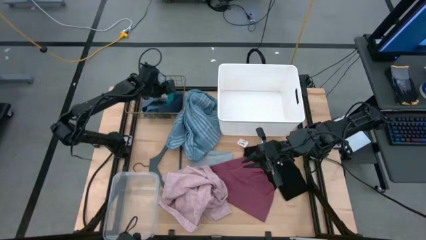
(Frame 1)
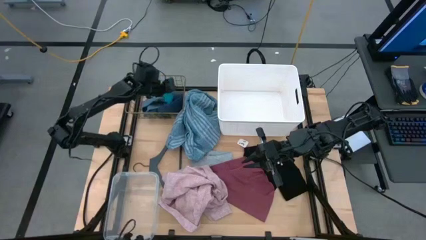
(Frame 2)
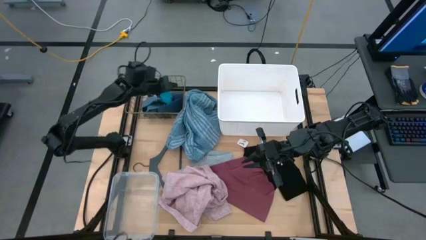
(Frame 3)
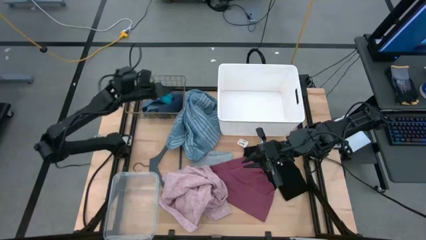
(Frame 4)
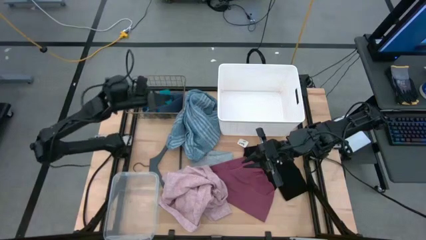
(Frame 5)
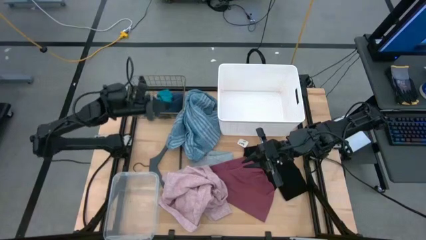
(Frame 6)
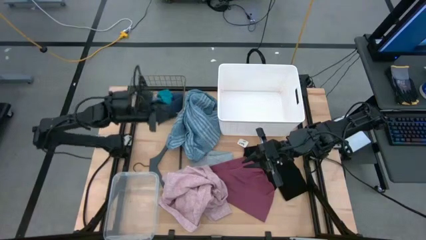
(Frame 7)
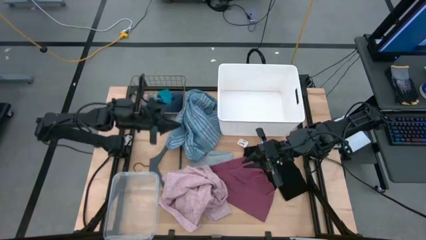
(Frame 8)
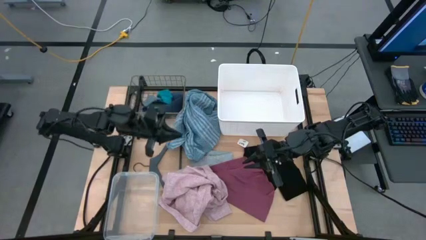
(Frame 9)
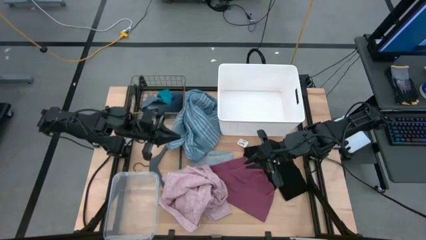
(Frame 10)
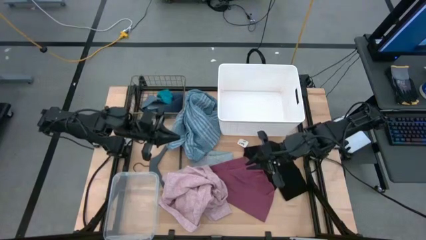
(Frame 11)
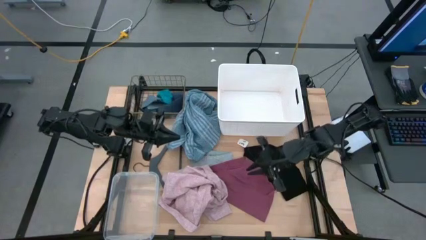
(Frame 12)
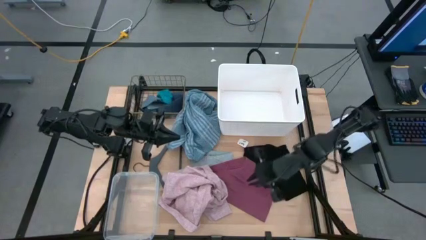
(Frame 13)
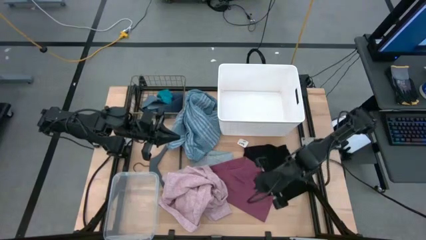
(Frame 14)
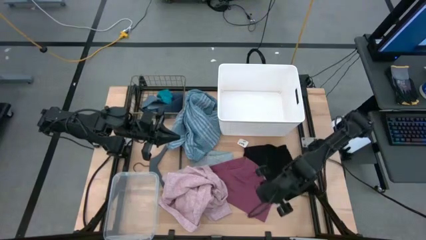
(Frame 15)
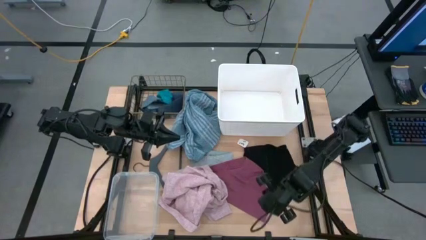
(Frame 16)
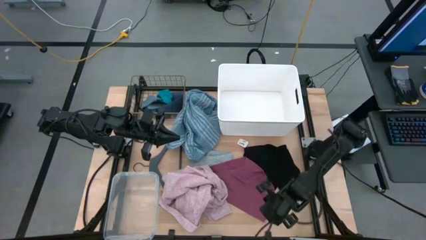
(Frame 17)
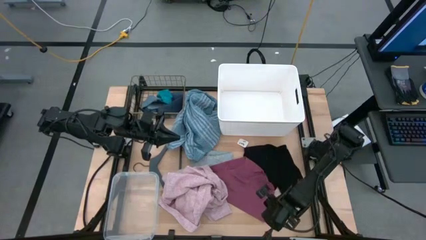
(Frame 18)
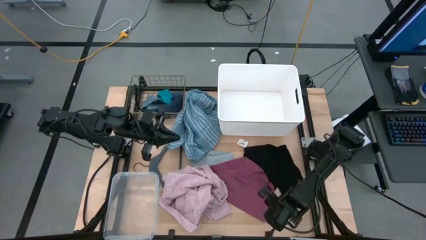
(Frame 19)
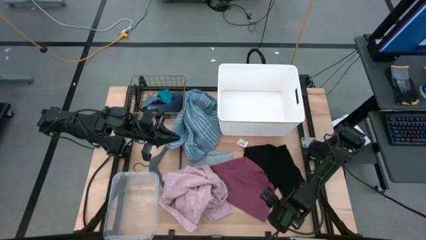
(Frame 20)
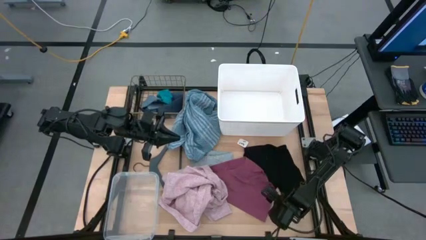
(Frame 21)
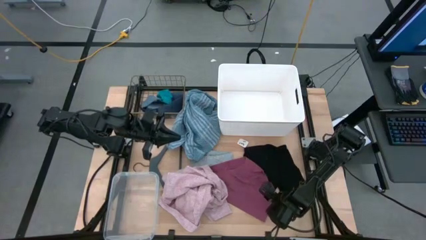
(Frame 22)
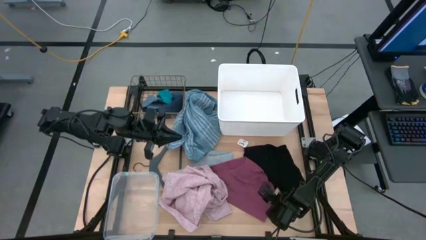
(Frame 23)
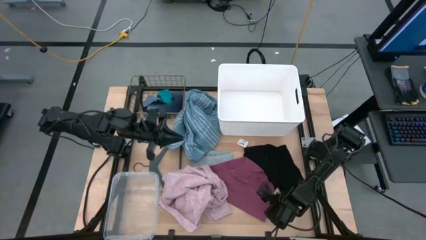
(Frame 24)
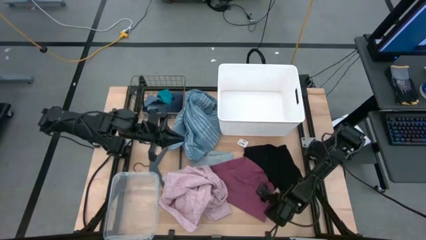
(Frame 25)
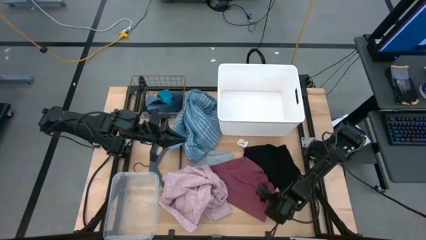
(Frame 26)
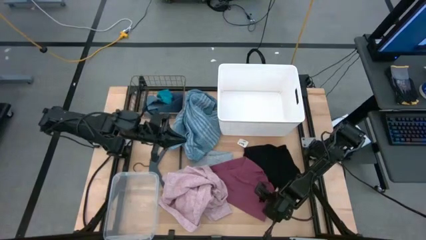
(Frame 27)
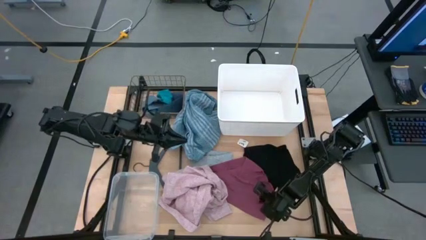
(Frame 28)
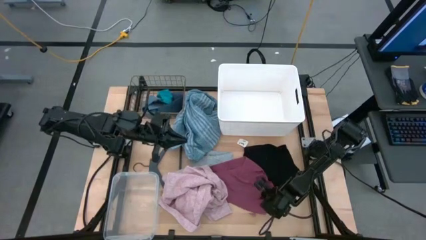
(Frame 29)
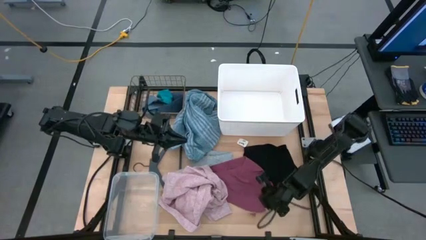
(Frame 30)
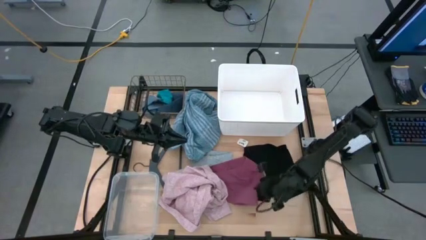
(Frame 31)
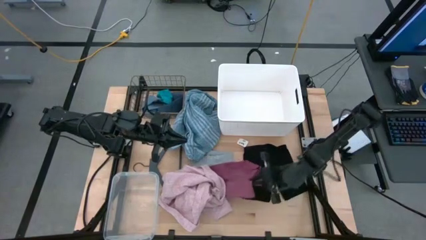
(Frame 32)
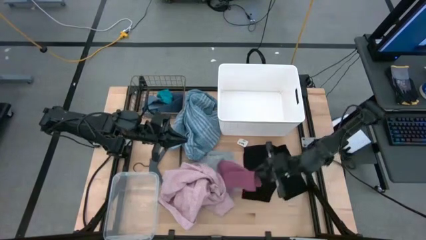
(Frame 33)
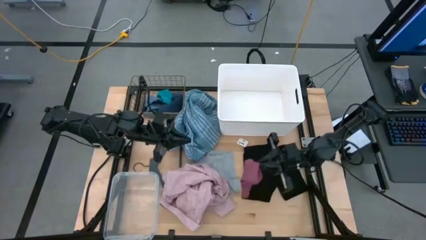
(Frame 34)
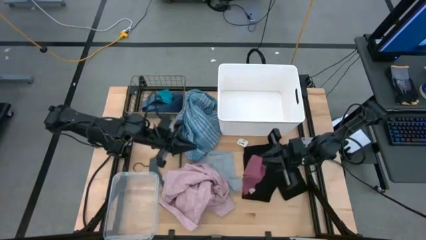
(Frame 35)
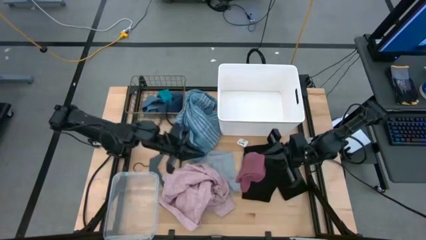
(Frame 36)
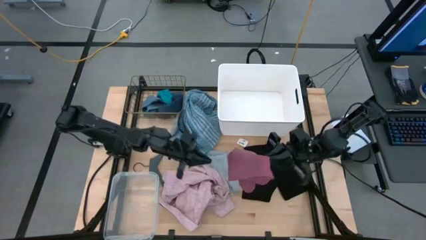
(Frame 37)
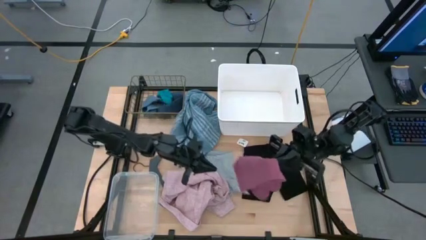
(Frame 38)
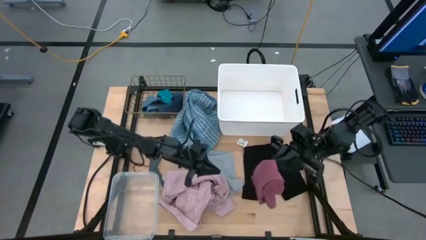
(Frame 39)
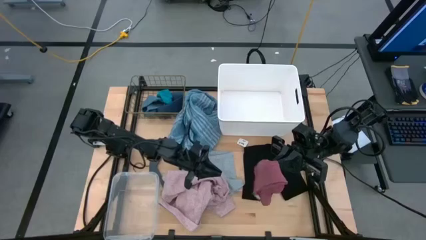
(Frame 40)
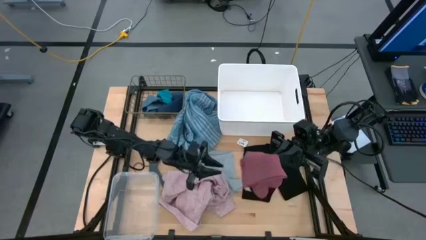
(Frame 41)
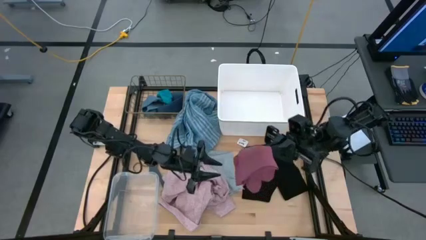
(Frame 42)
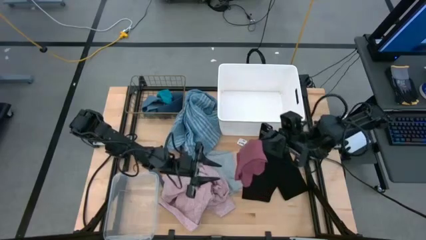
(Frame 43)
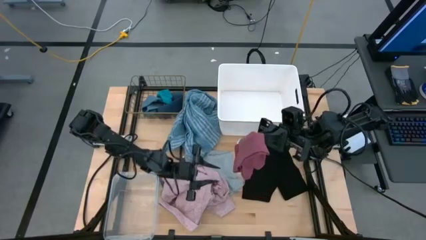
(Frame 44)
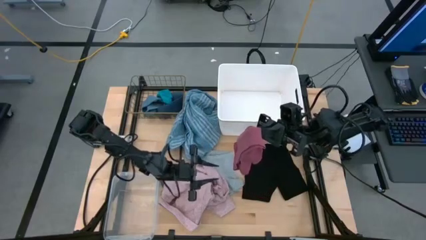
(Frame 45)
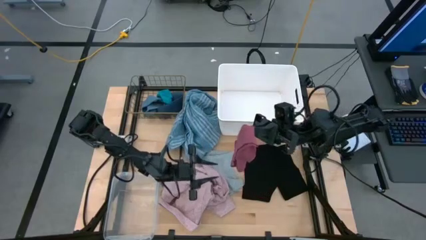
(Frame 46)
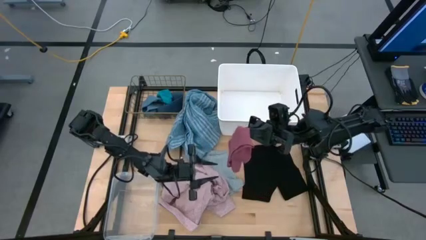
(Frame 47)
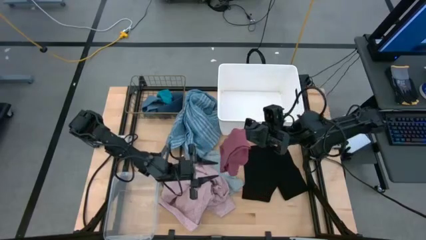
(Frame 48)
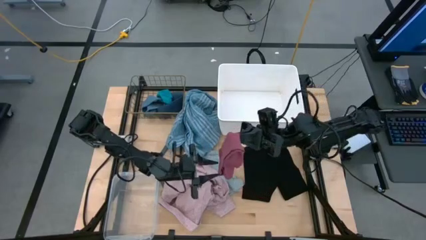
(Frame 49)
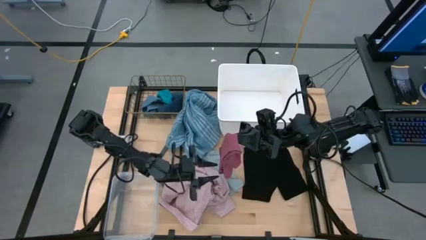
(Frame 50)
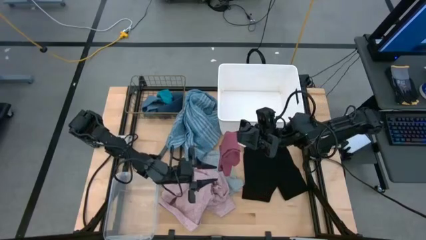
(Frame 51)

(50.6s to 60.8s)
Task: Pick & Place Cloths
Put the pink boxers into the transparent bin

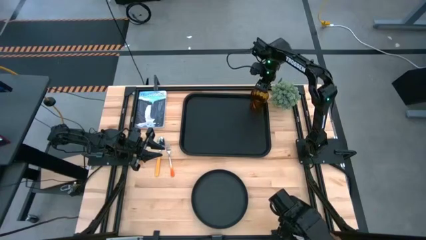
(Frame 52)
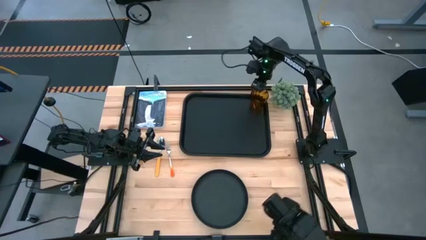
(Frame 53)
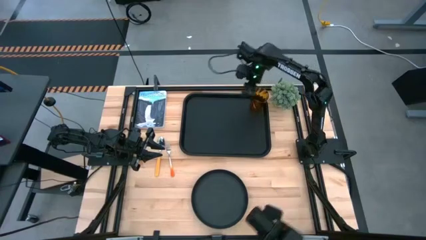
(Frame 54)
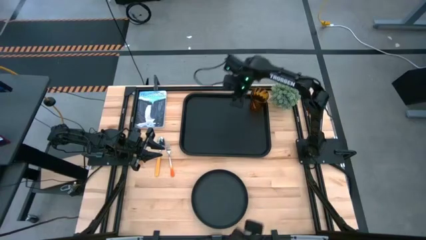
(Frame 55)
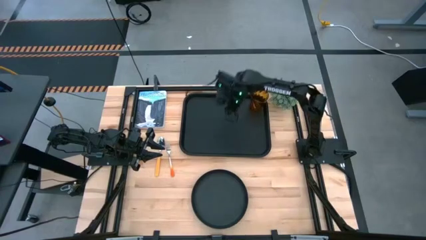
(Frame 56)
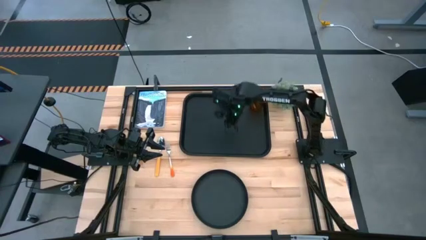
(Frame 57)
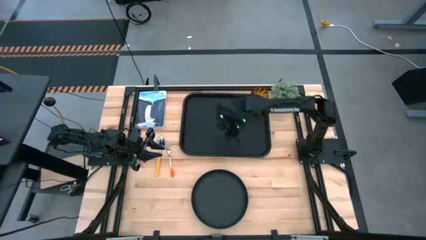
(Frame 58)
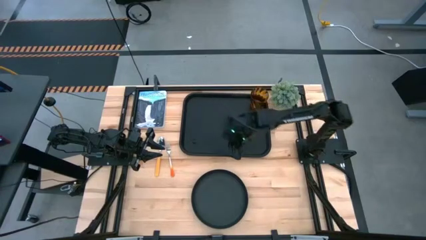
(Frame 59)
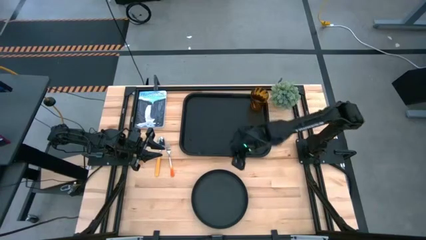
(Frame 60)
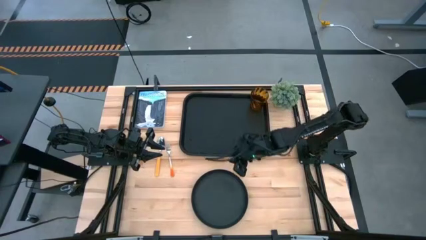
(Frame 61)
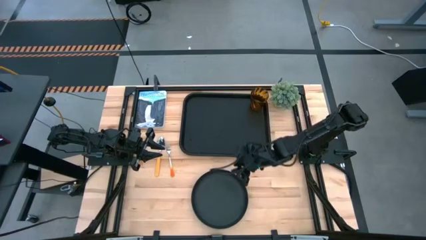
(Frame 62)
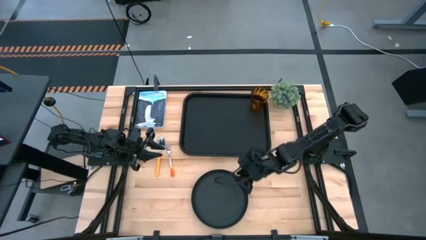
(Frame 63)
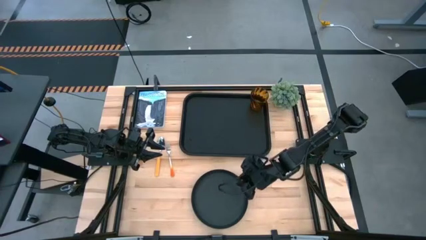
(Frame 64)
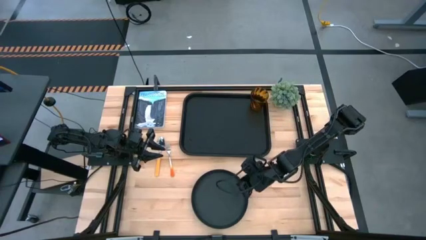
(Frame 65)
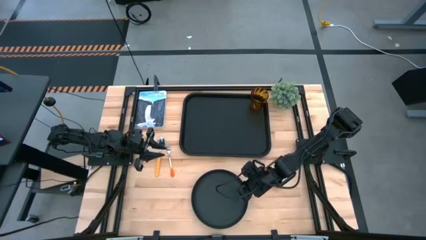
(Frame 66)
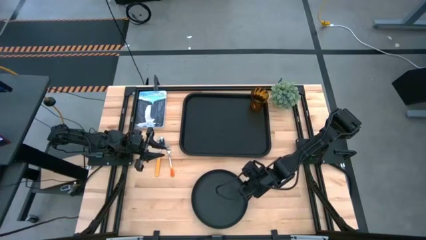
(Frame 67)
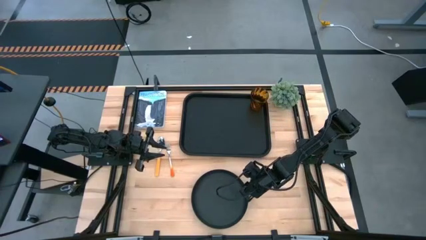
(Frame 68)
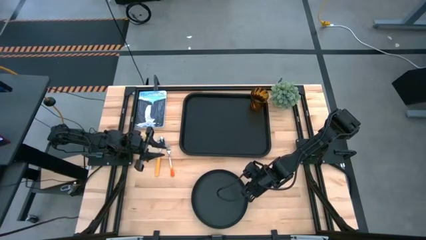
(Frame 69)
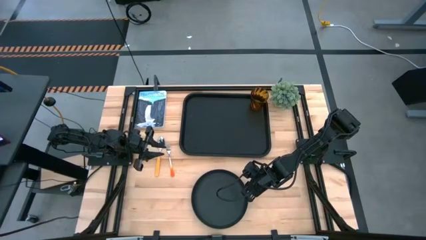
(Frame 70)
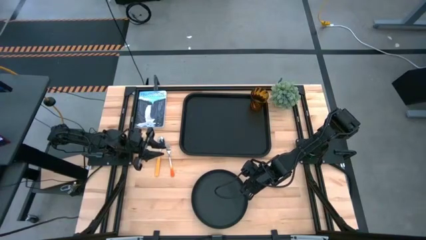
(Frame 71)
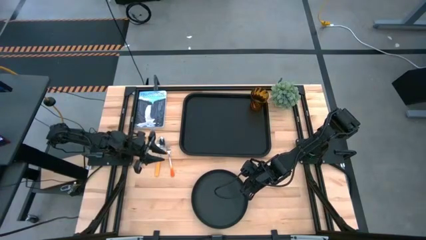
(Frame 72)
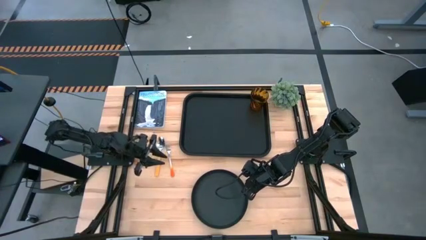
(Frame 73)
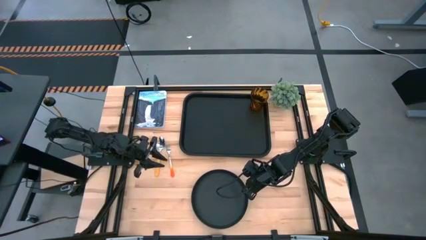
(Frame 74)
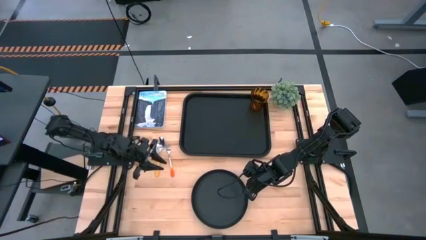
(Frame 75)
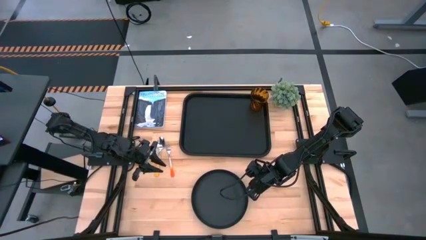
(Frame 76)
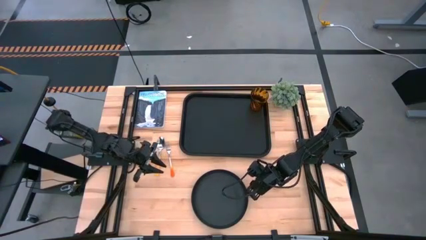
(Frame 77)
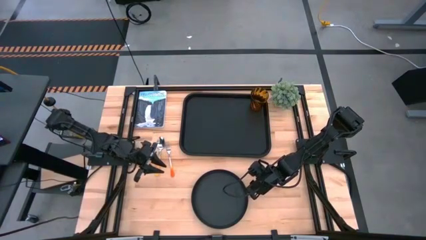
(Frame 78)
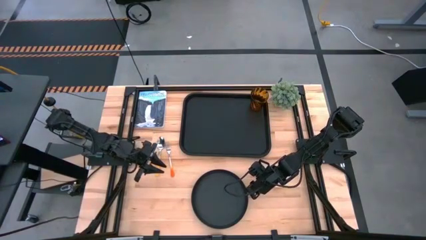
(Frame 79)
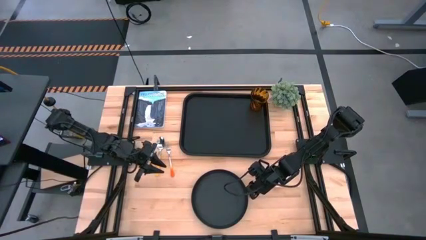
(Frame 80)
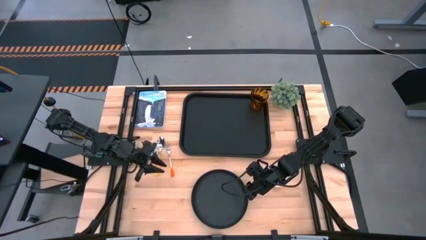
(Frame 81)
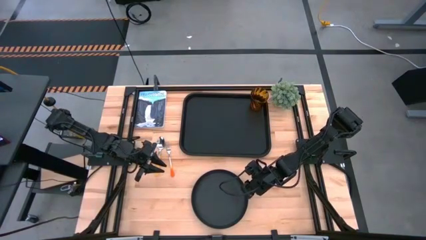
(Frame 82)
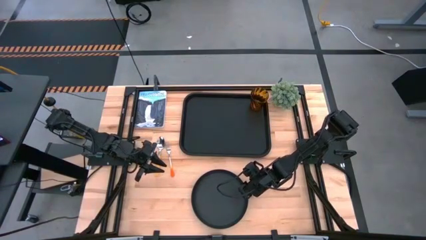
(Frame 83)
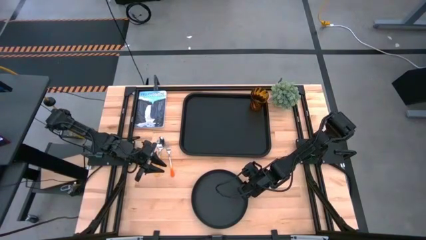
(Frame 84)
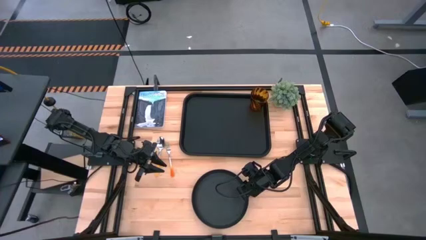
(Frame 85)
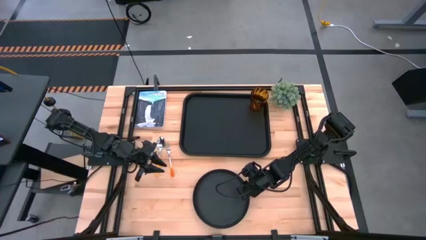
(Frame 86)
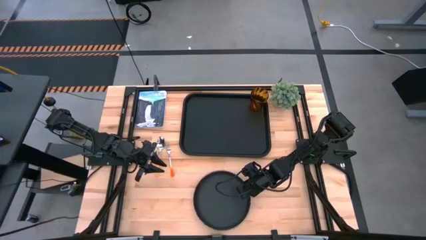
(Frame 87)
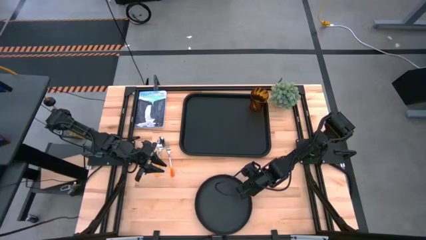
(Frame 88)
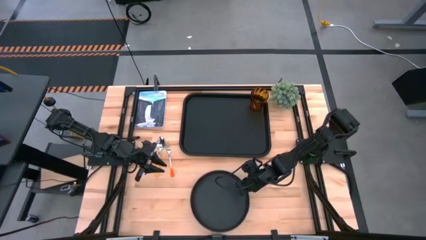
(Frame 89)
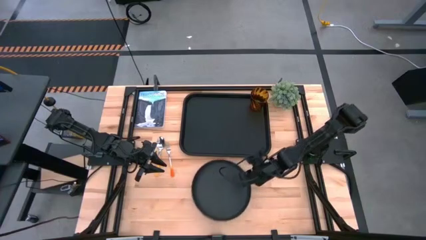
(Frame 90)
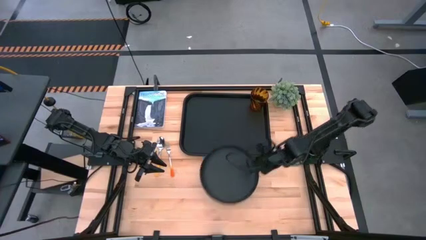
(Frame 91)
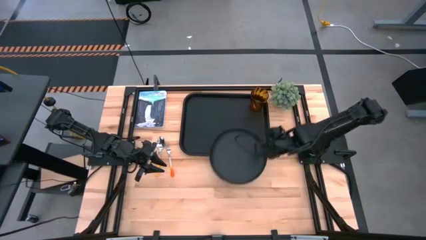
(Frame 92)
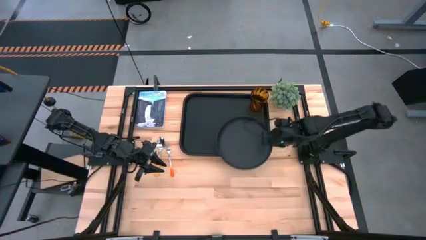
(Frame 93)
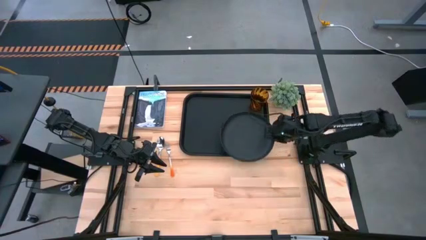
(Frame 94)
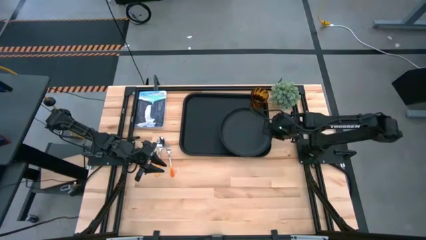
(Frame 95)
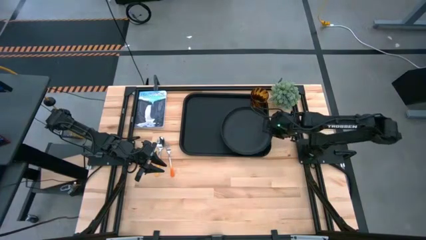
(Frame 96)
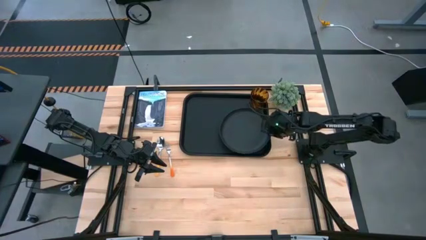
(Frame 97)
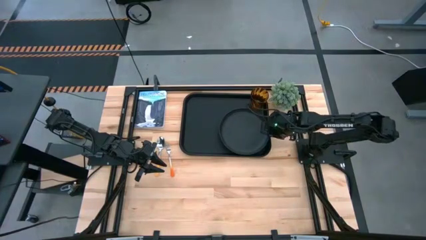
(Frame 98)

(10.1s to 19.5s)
Task: Pick and place plate/cup/fork/spoon on tray
Put the black plate on the black tray below the orange cup
